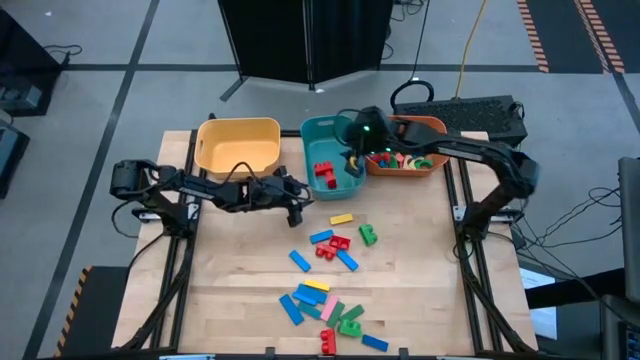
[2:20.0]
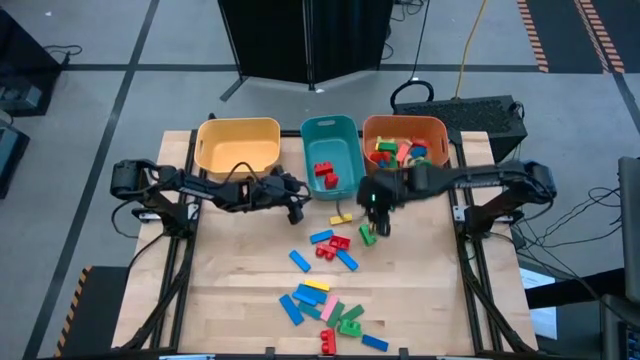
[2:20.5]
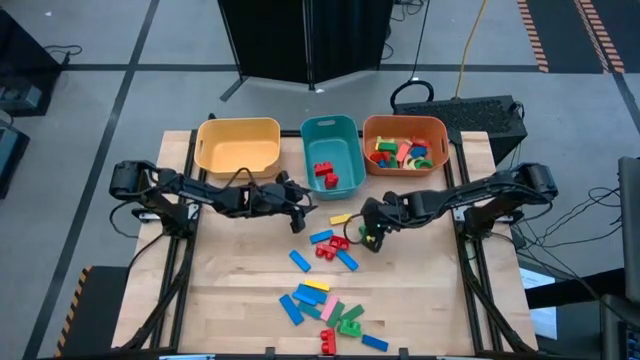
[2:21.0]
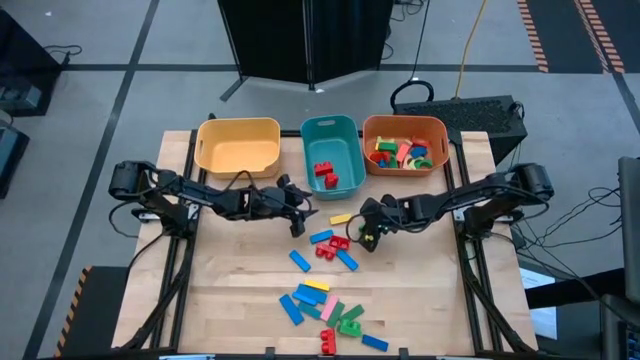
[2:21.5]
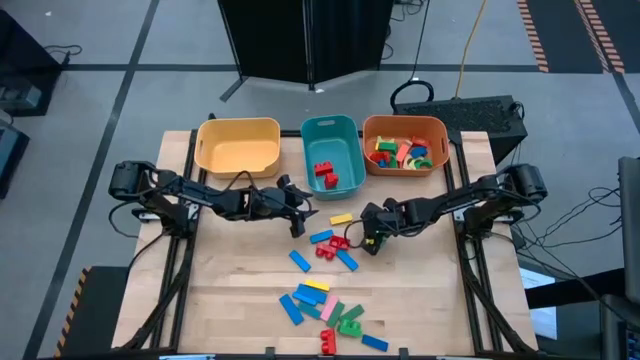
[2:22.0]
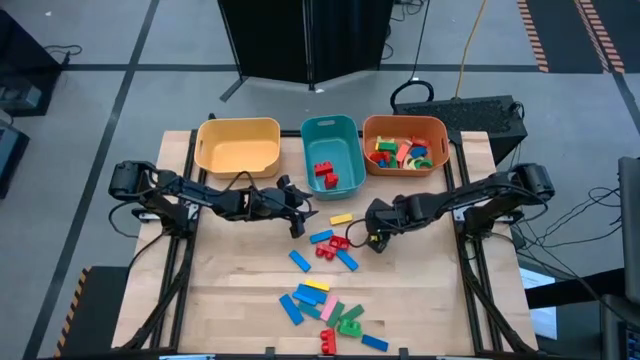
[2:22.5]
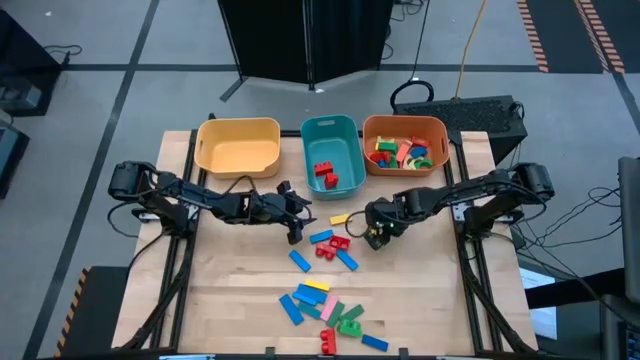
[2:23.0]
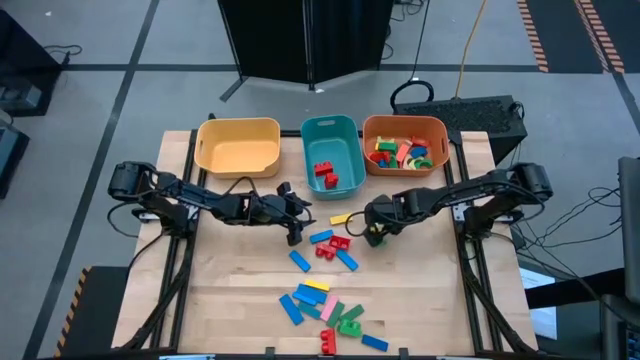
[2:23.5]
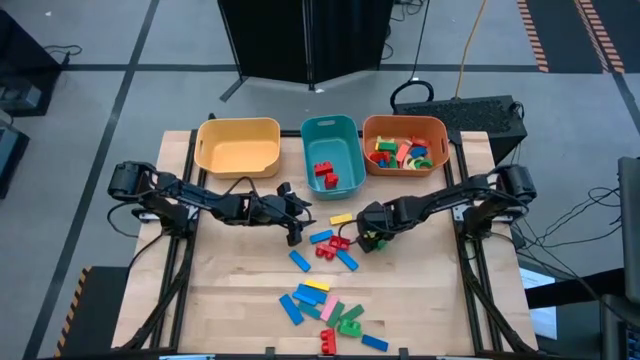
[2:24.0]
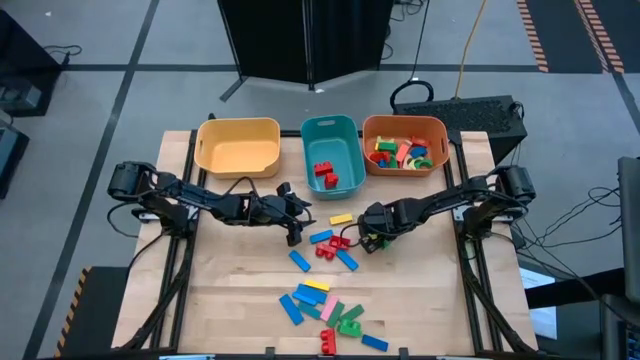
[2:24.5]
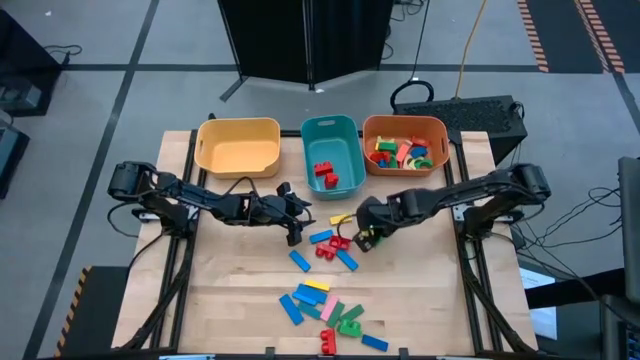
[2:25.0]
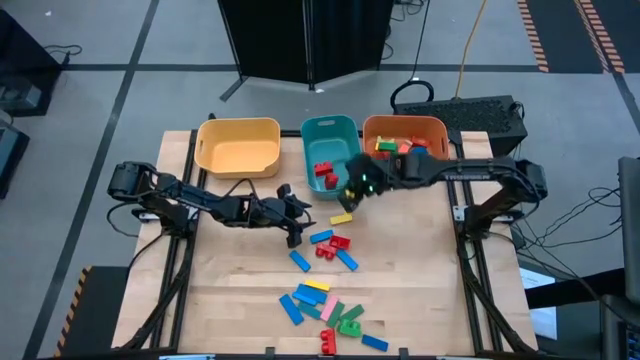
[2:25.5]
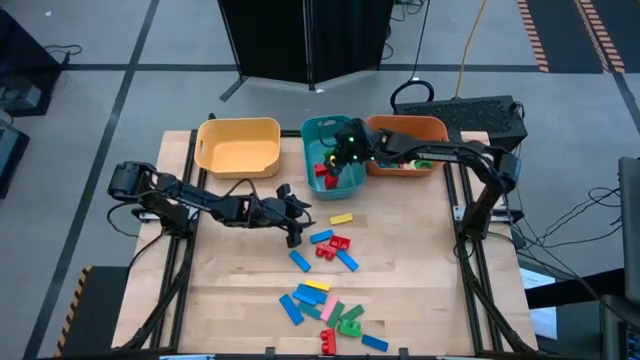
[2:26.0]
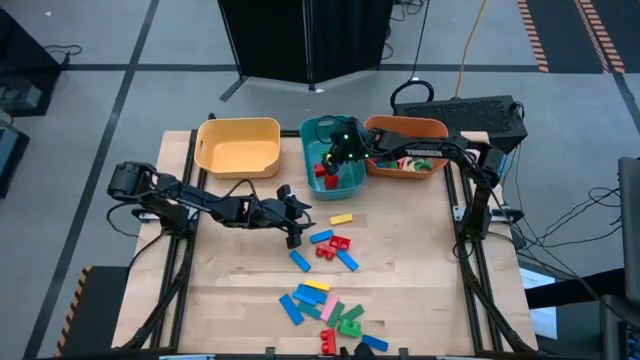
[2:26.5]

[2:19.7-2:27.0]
Task: Sort blocks by size
Put the green 2 stud game piece into the blue bin

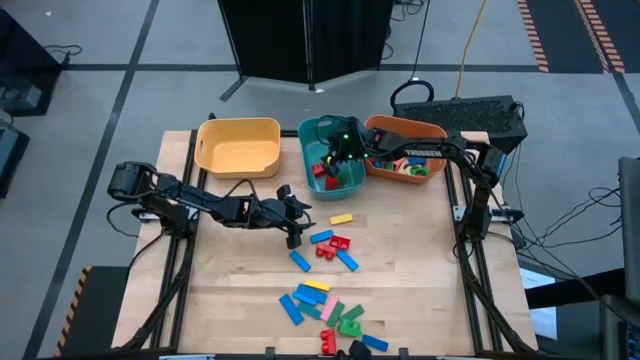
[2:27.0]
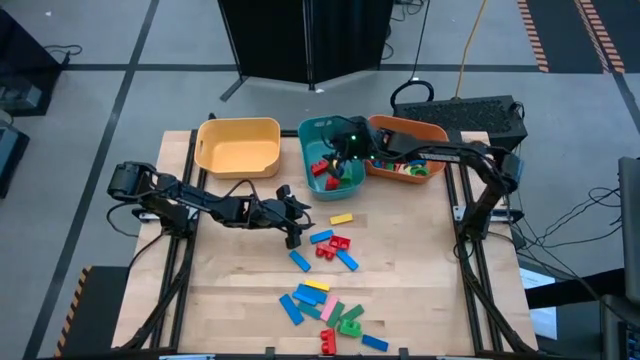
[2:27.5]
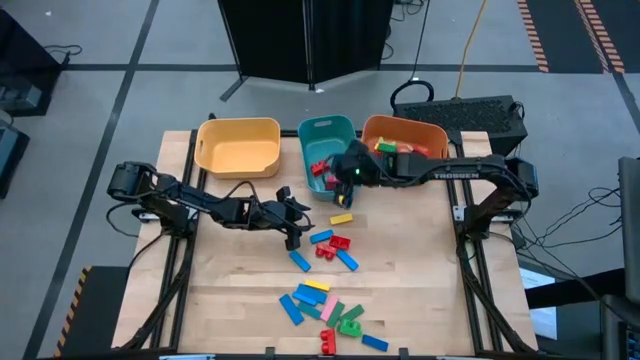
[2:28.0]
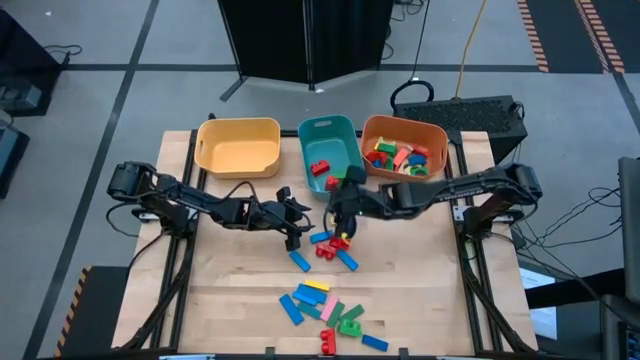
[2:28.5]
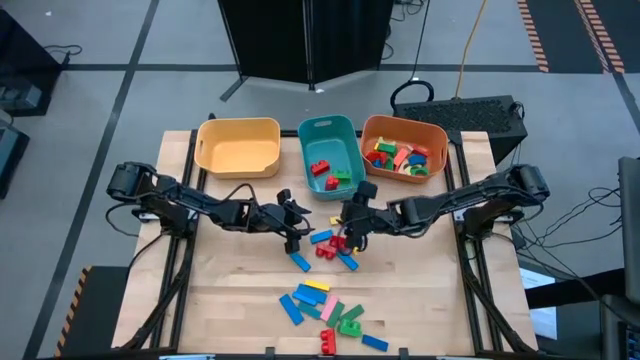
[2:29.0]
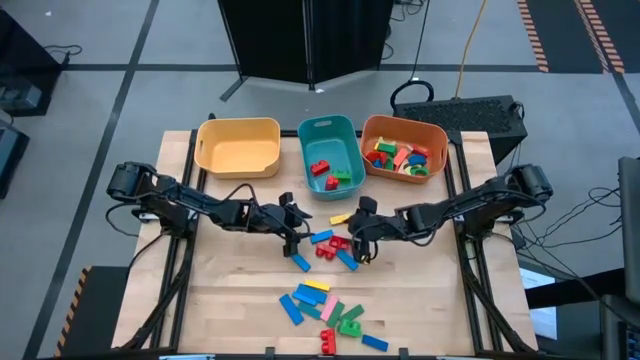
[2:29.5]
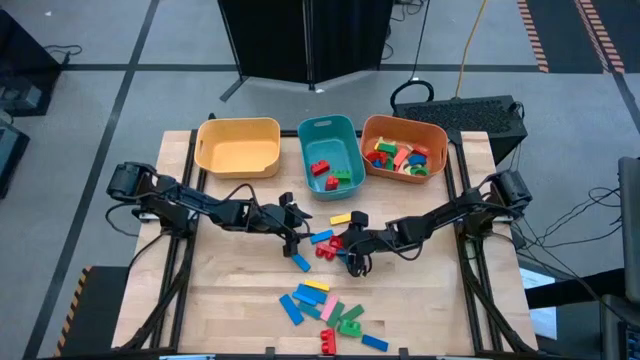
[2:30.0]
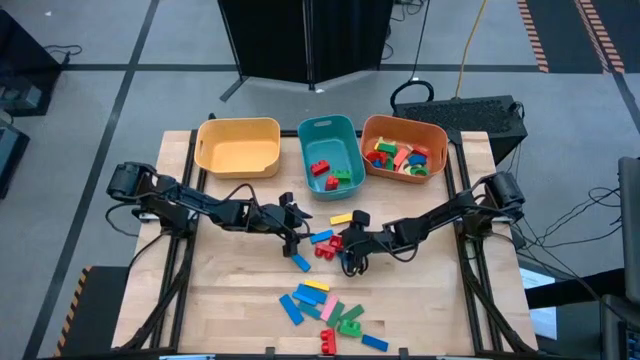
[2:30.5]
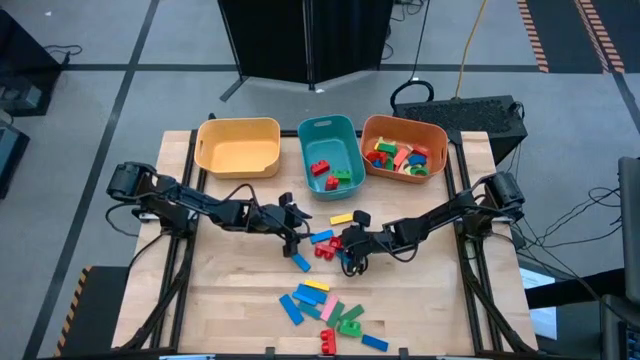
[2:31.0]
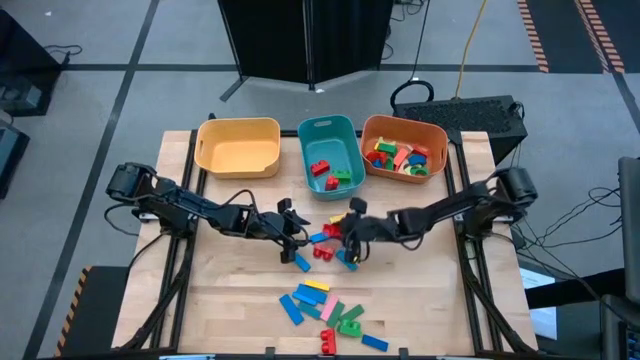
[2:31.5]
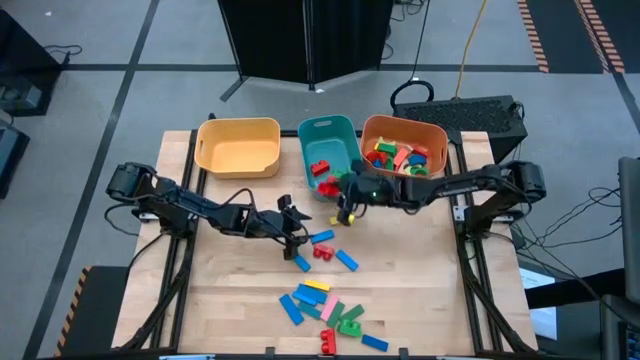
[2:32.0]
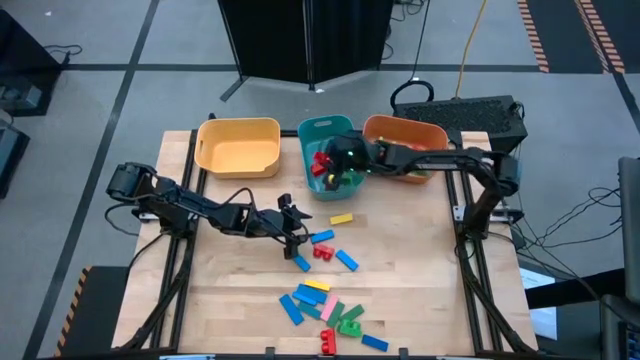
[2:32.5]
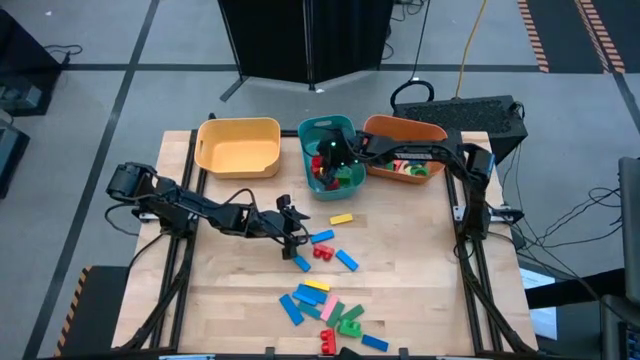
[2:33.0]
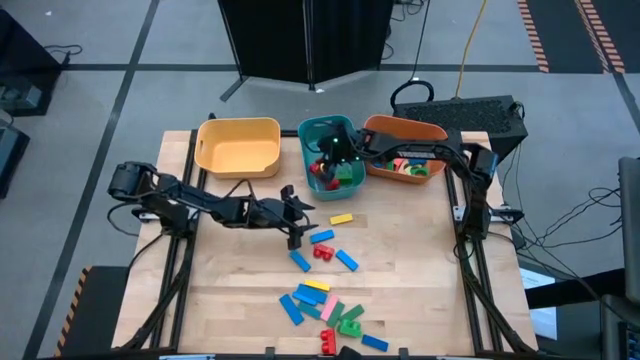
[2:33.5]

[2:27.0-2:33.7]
Put the red 2 stud game piece into the blue bin

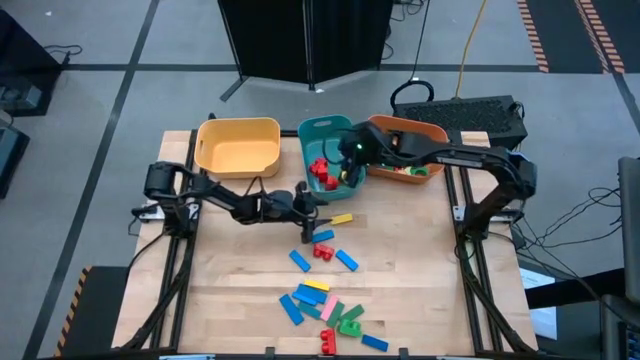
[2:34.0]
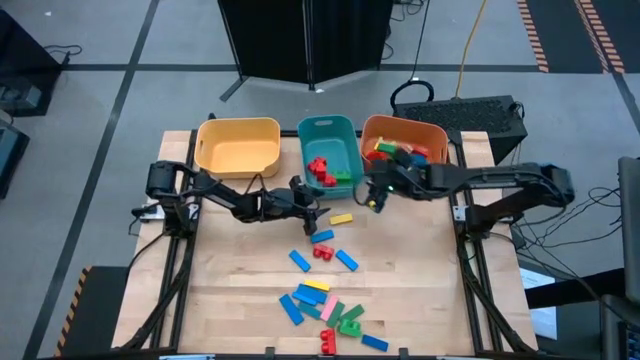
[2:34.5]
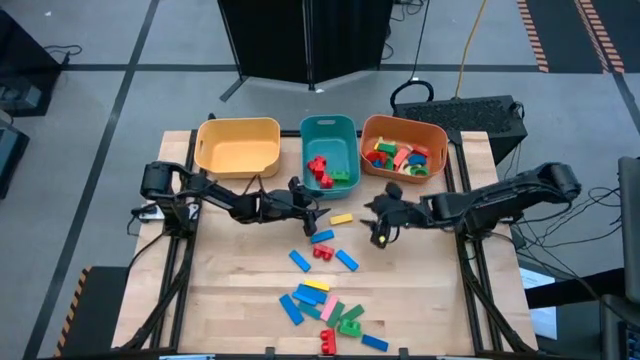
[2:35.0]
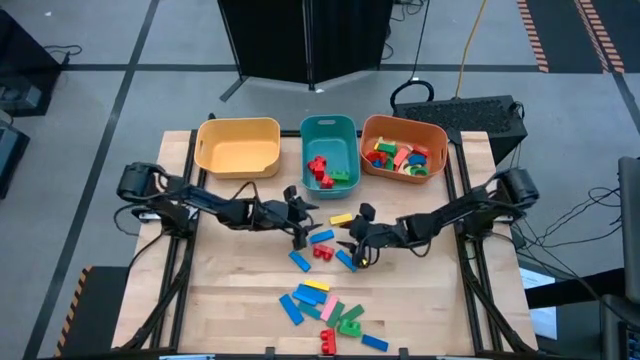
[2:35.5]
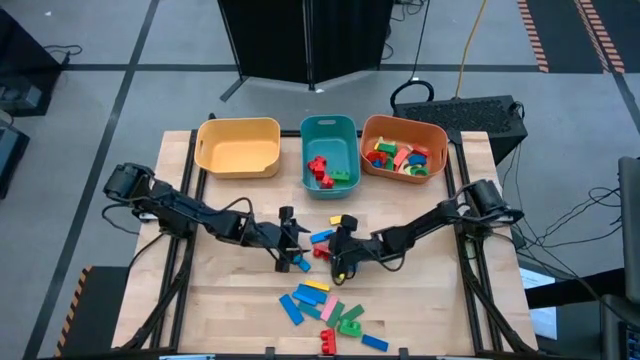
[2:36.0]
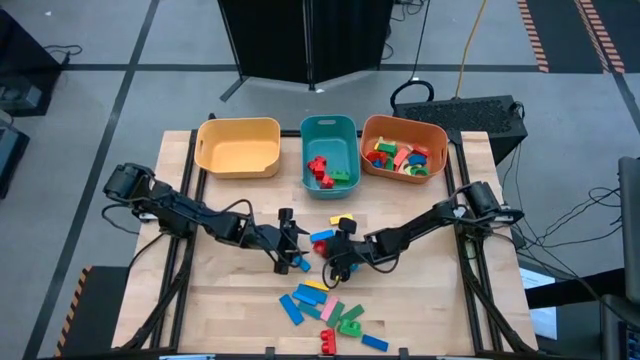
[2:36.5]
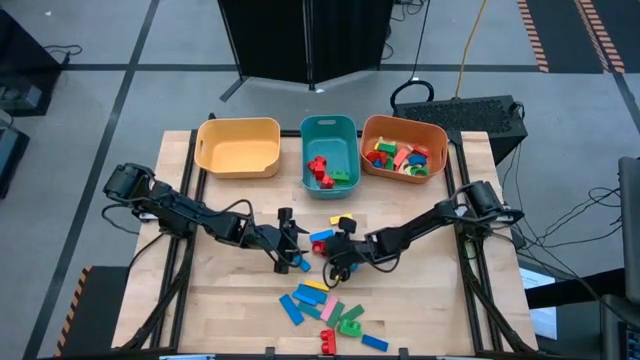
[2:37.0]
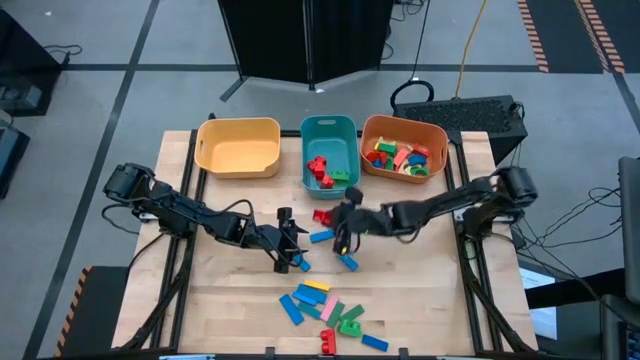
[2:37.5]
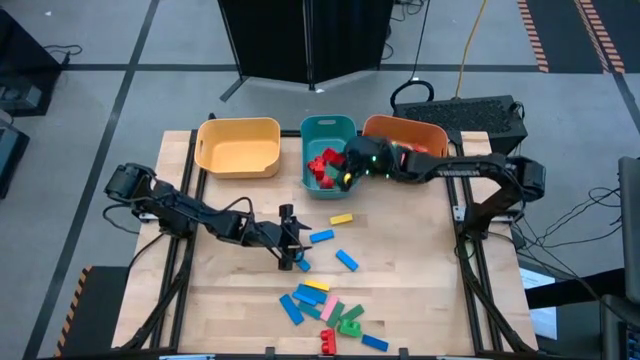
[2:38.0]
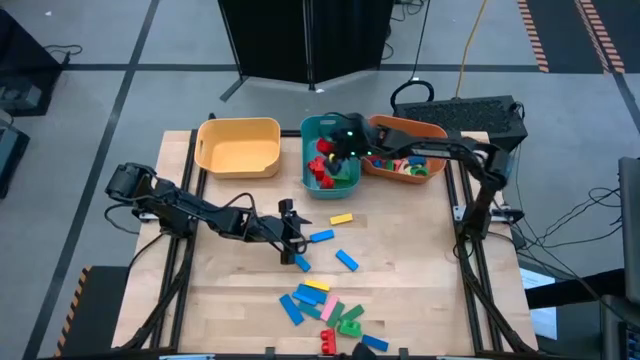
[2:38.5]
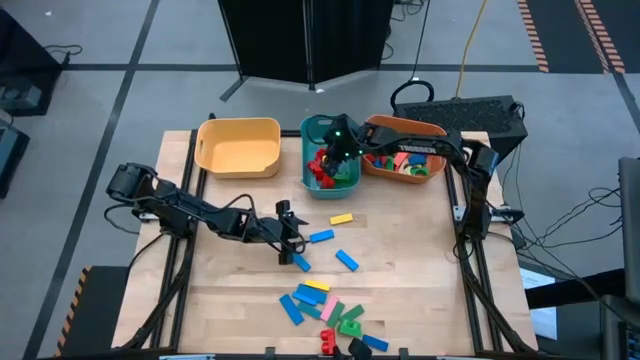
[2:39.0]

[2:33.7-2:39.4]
Put the red 2 stud game piece into the blue bin

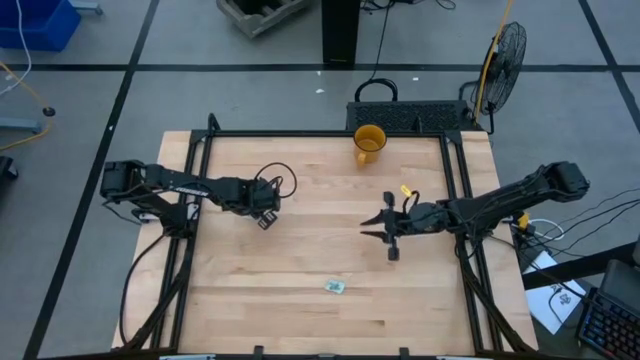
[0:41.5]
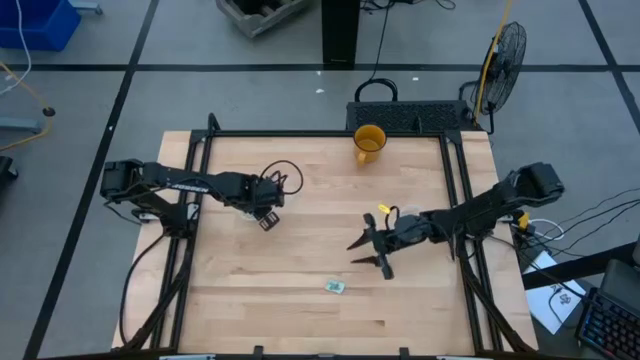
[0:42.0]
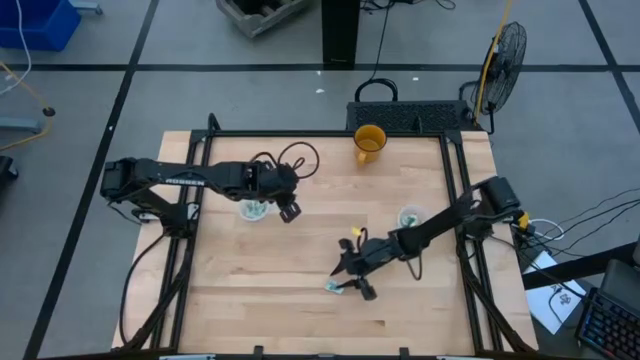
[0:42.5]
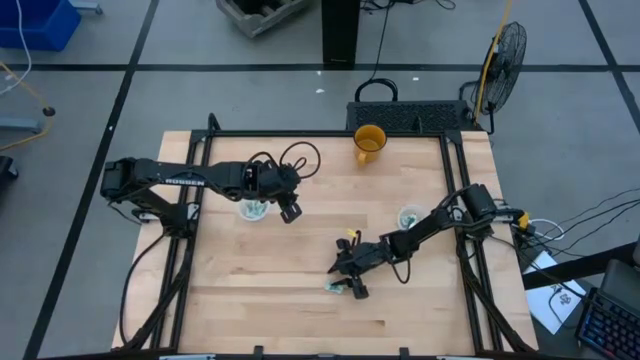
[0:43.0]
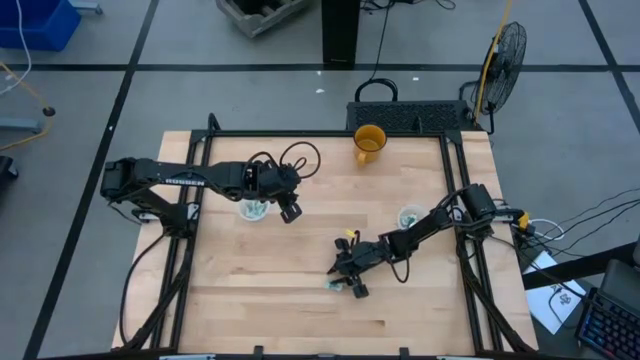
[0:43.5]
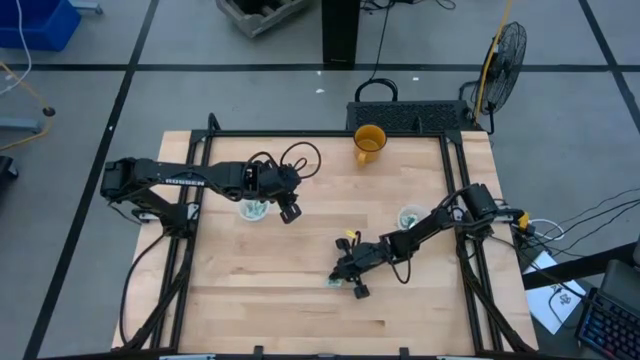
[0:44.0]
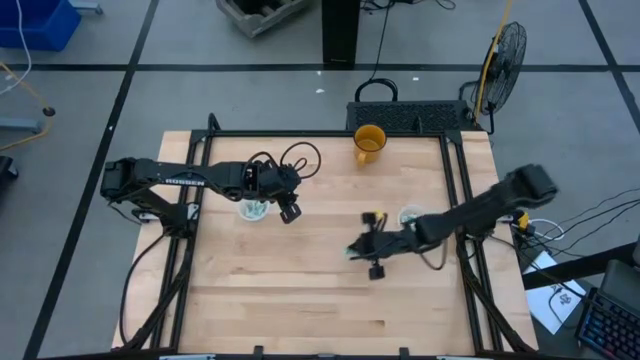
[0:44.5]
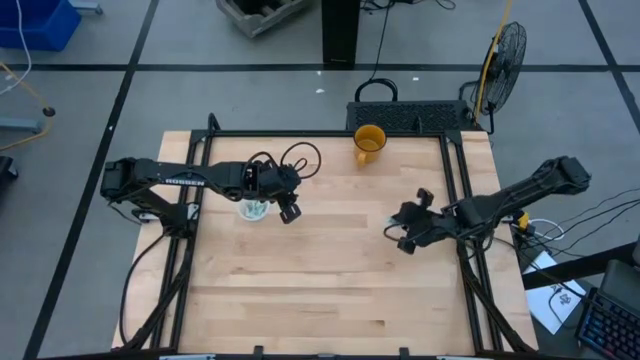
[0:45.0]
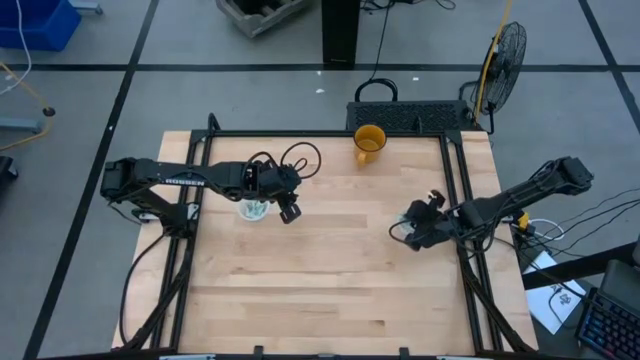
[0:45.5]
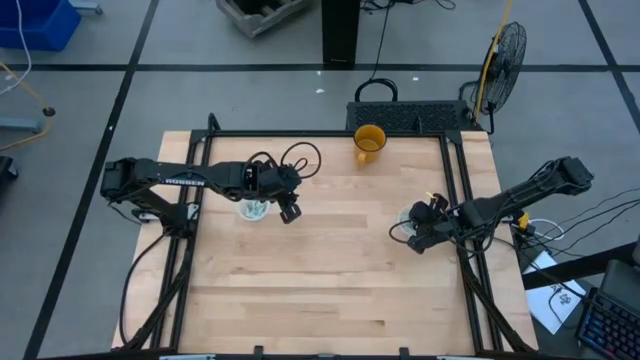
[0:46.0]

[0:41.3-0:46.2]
Task: Pick and place Stevia / Truvia into bins
Put the stevia packet into the right transparent container
